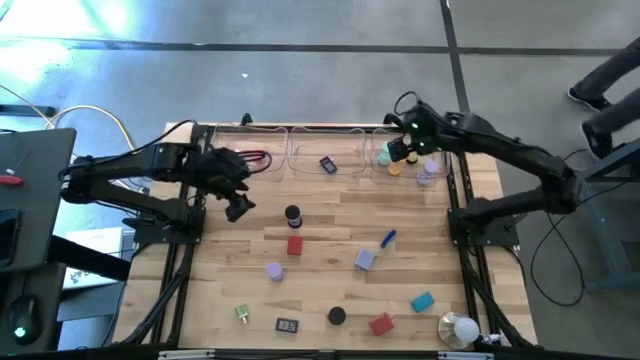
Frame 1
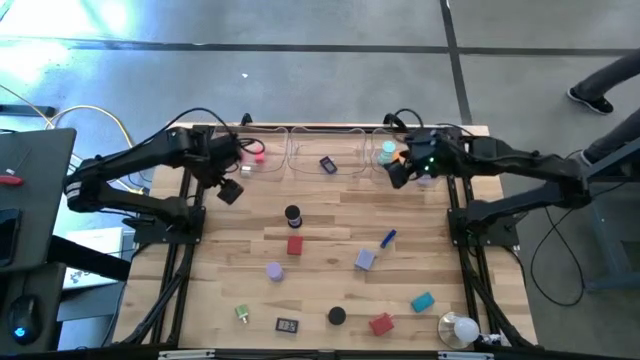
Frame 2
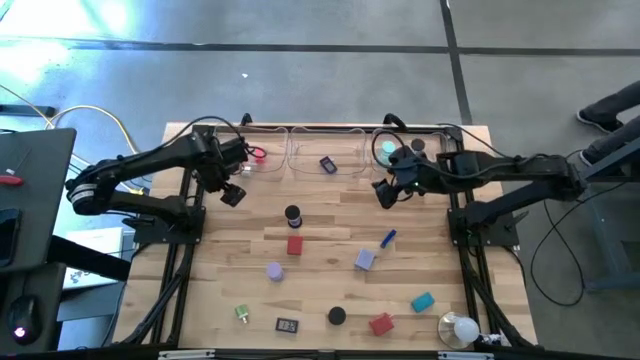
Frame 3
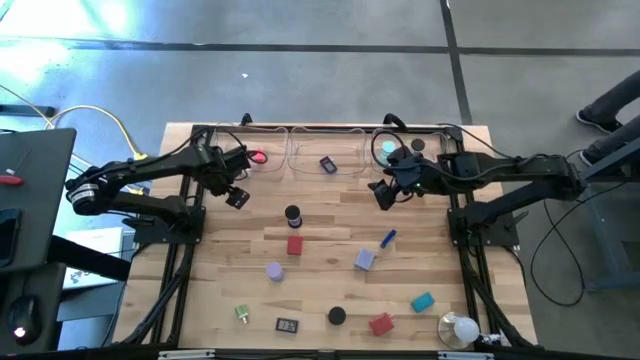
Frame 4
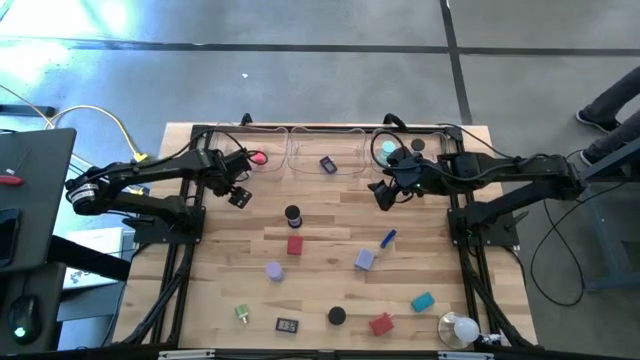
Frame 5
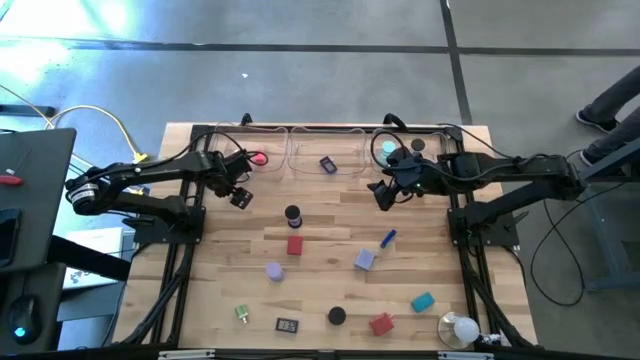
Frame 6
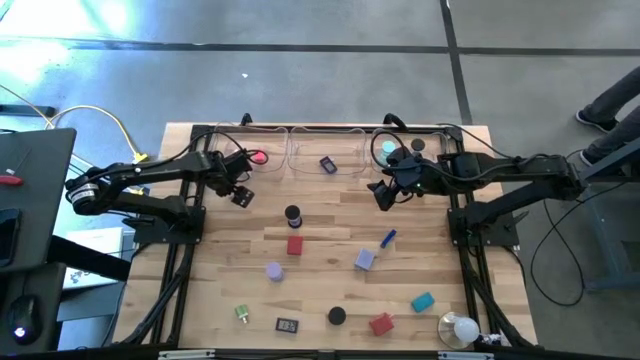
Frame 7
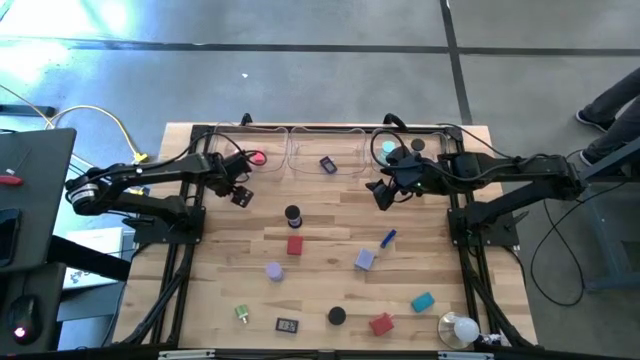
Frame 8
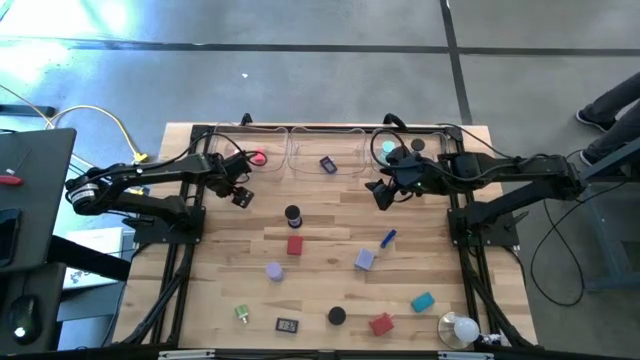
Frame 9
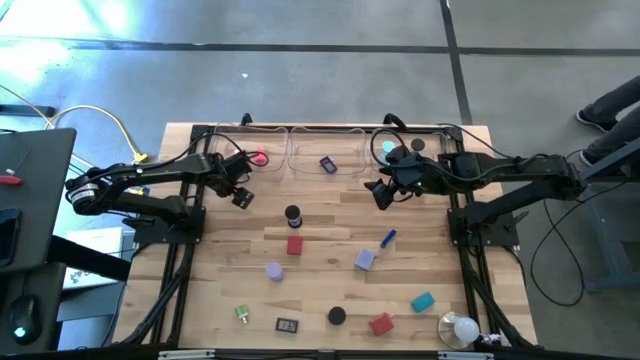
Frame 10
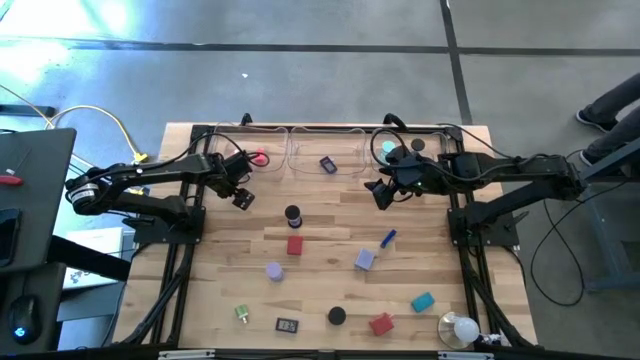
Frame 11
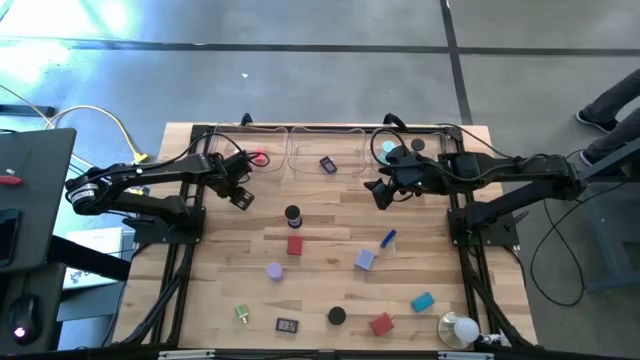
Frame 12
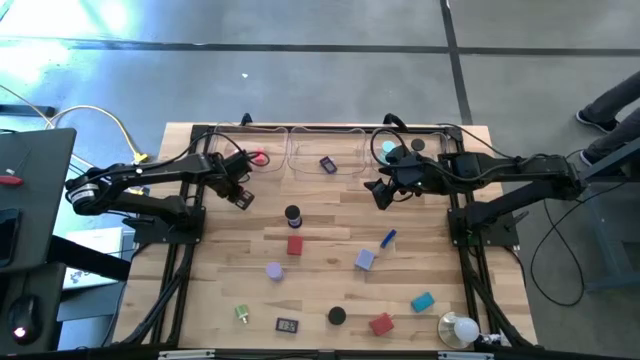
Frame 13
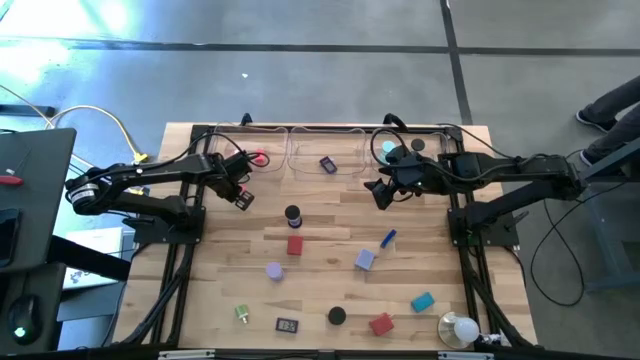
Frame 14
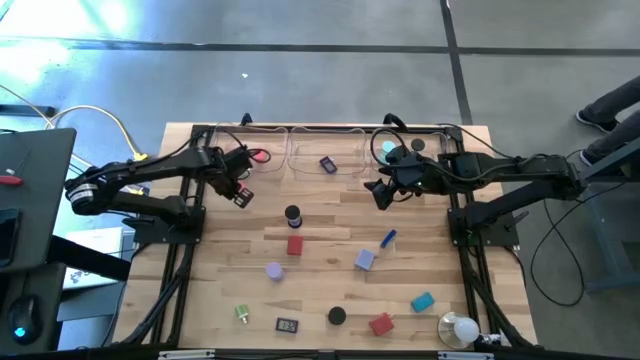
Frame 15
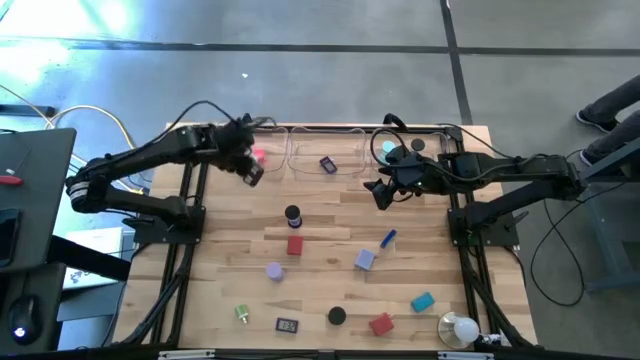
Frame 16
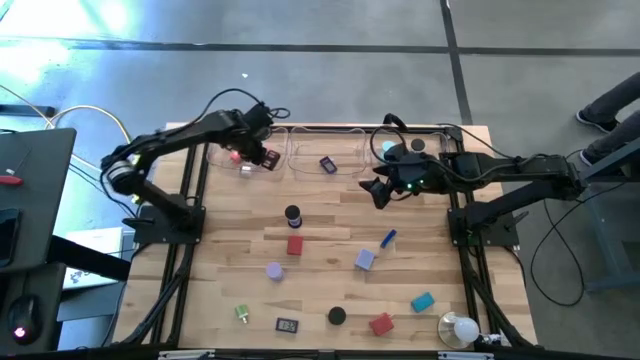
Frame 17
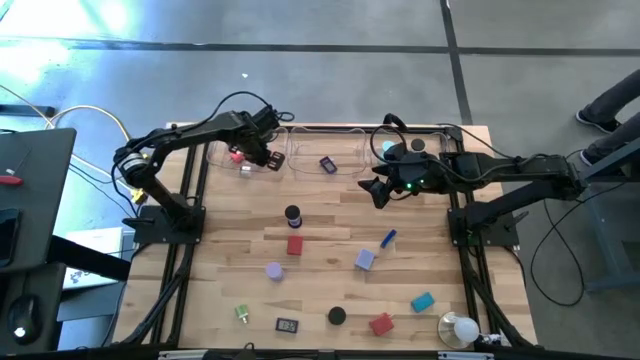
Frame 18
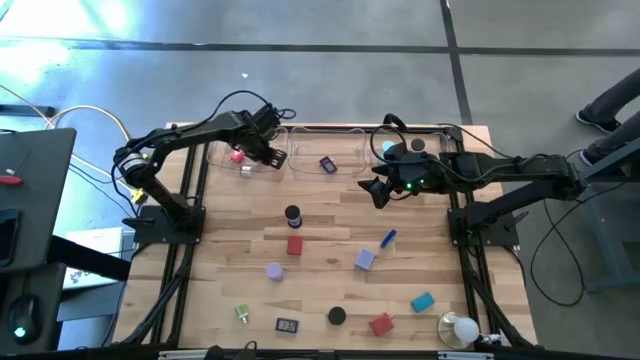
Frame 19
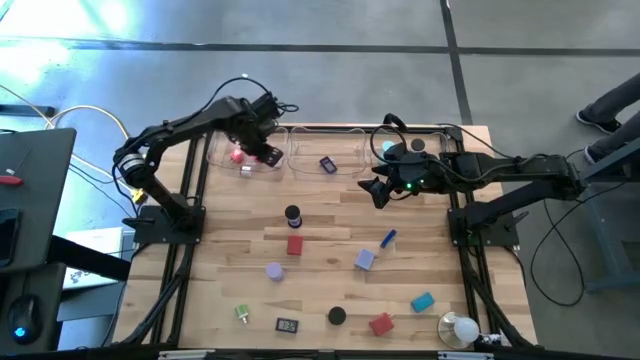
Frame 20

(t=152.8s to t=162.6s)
Task: Pick & Place Office items
Put the pink charger adapter into the left transparent bin

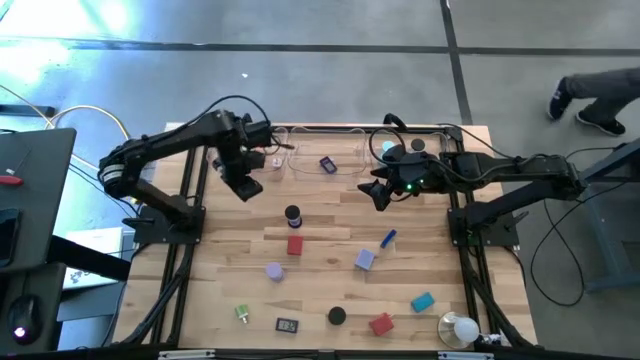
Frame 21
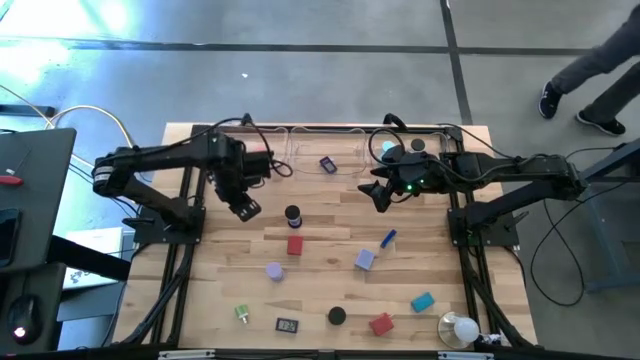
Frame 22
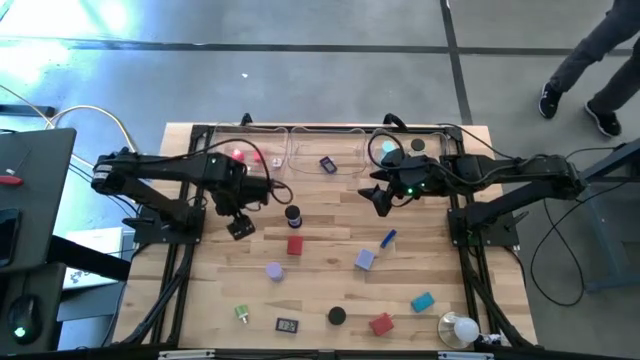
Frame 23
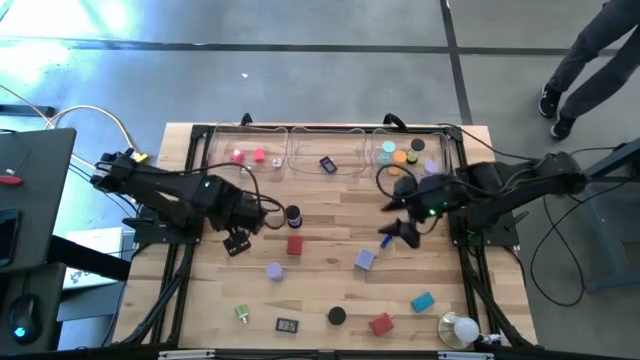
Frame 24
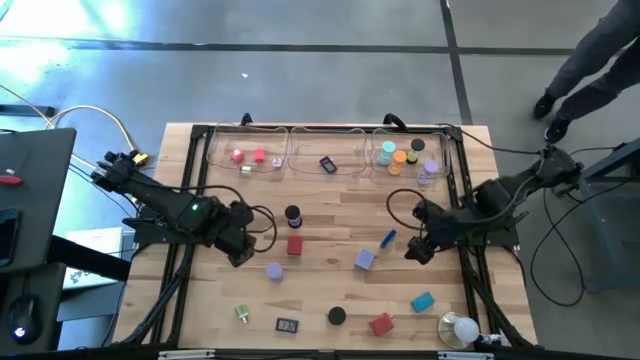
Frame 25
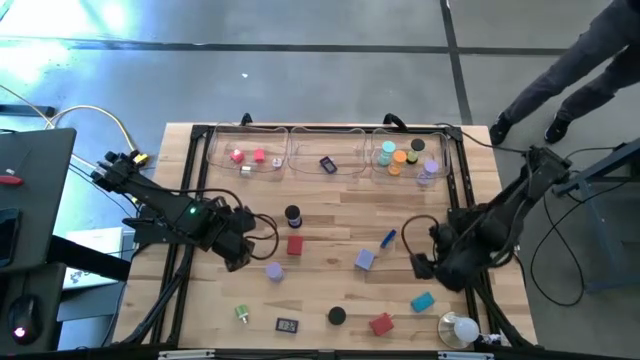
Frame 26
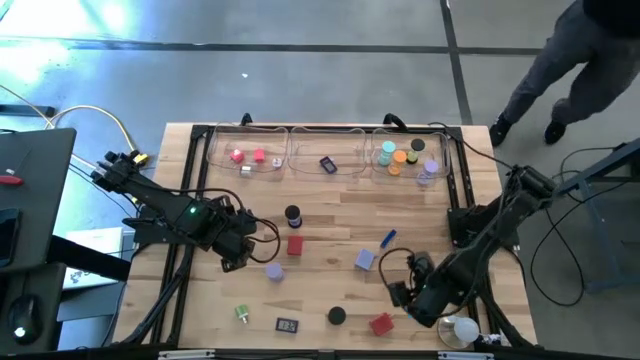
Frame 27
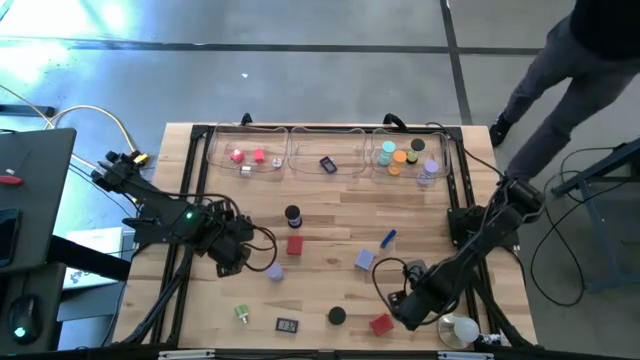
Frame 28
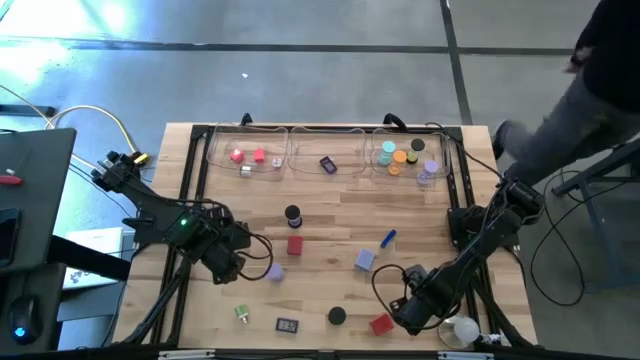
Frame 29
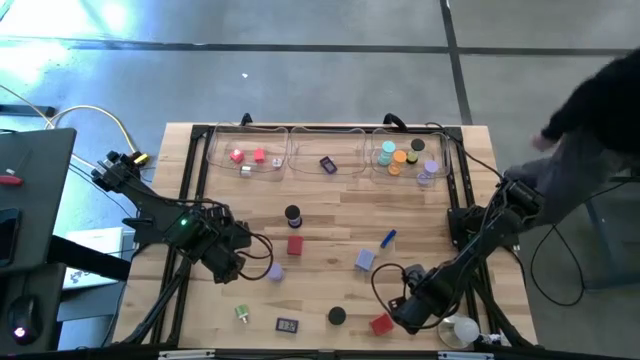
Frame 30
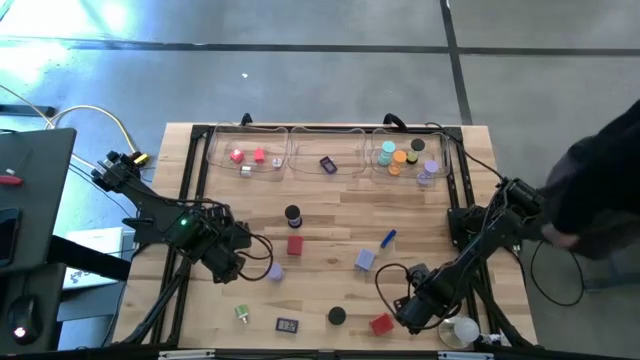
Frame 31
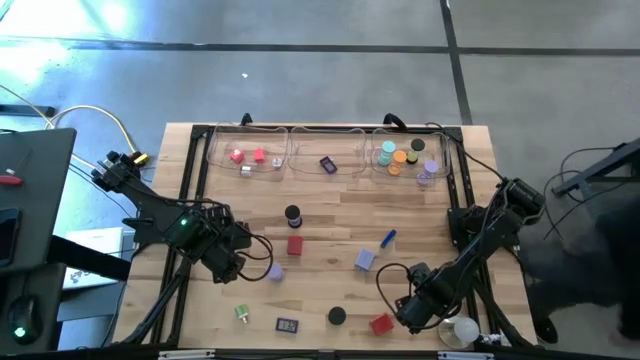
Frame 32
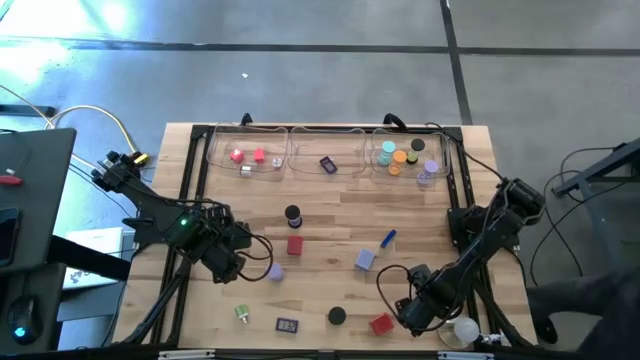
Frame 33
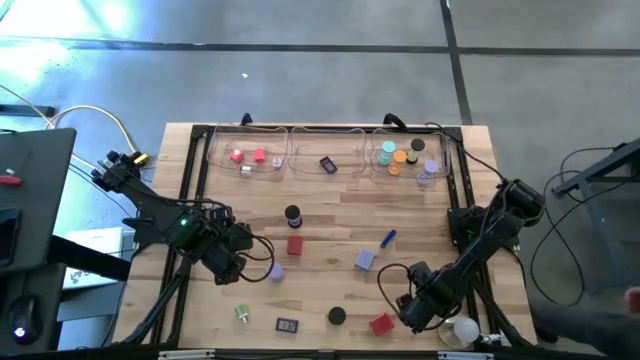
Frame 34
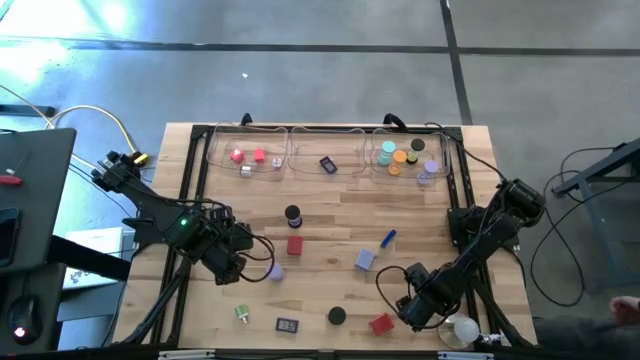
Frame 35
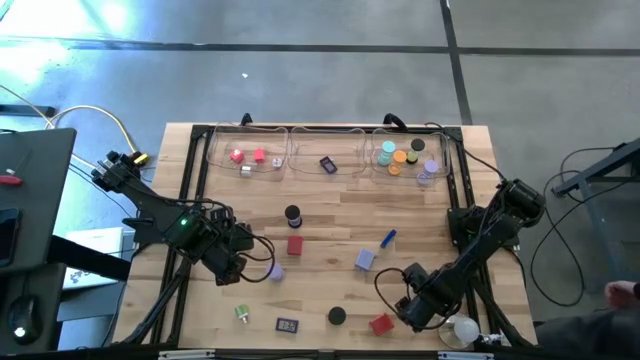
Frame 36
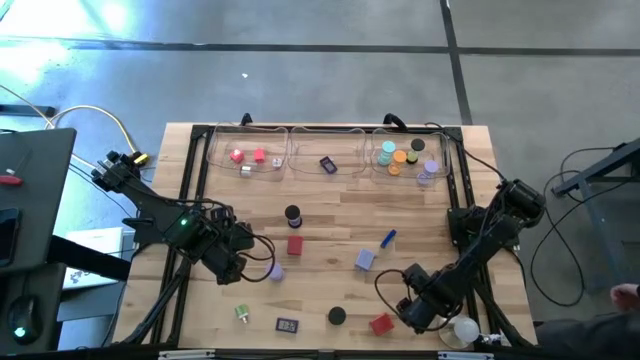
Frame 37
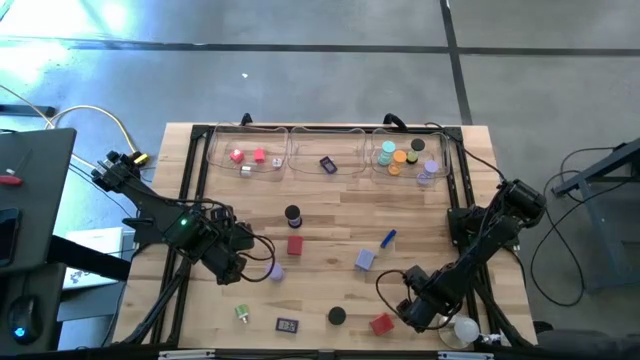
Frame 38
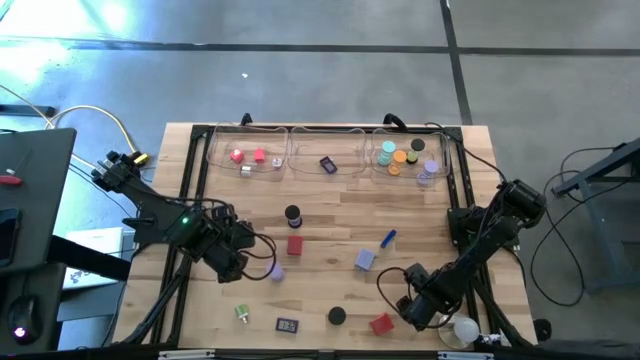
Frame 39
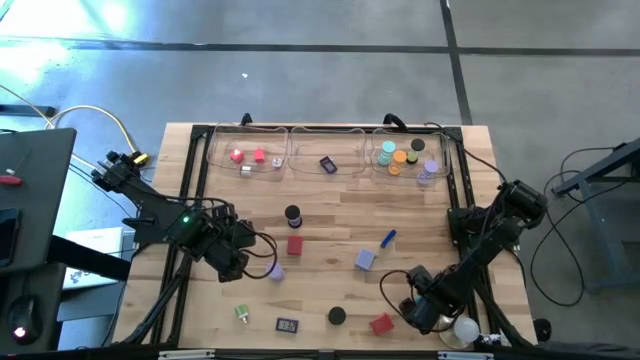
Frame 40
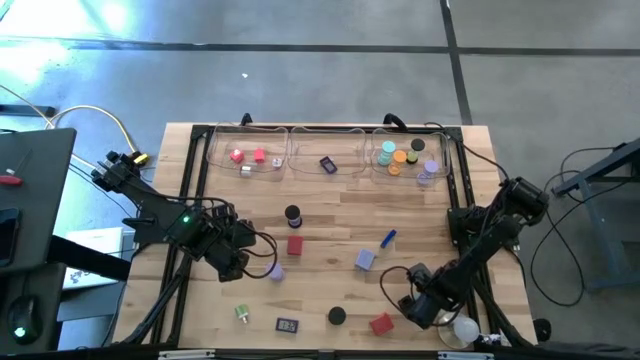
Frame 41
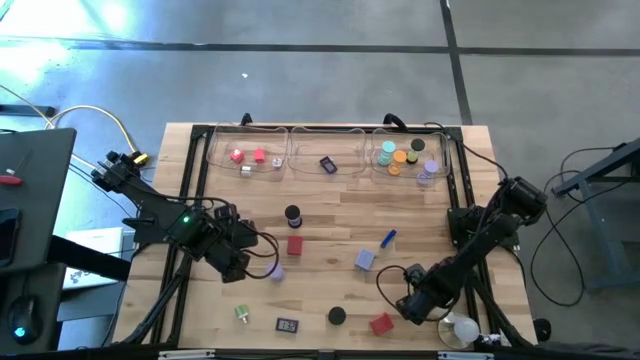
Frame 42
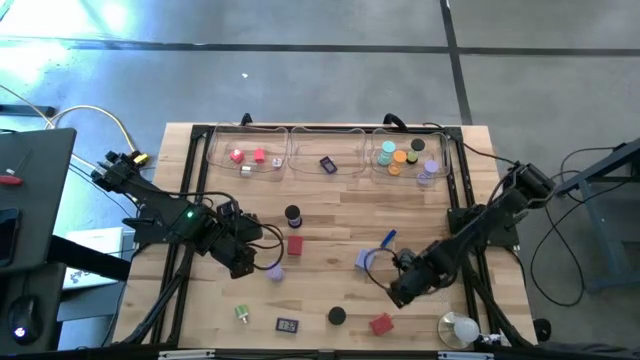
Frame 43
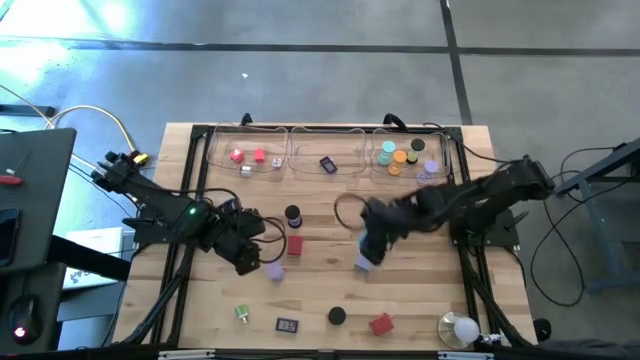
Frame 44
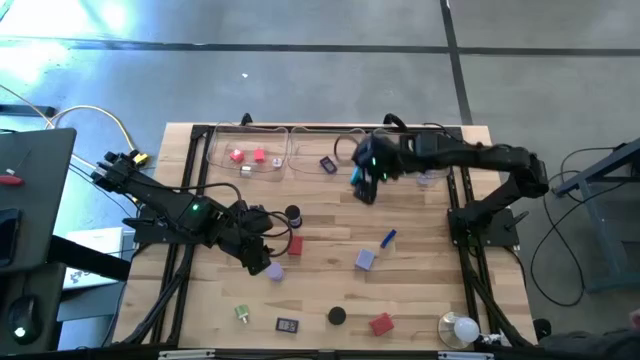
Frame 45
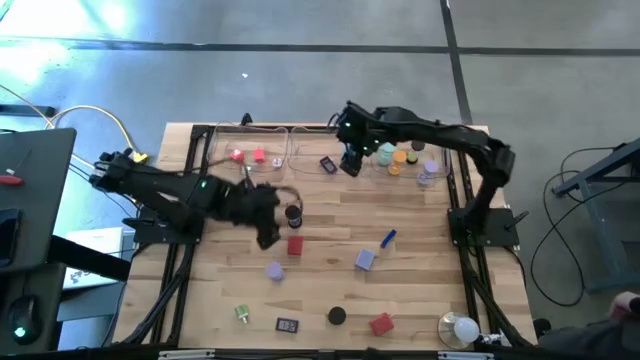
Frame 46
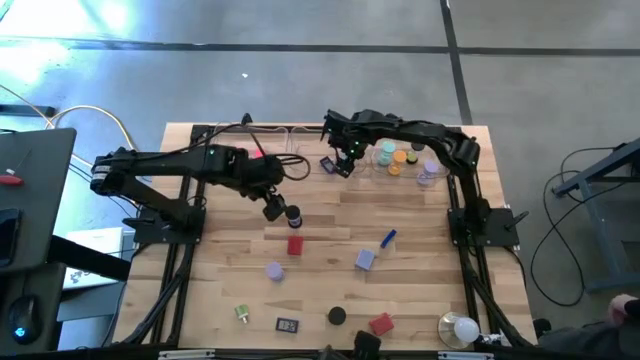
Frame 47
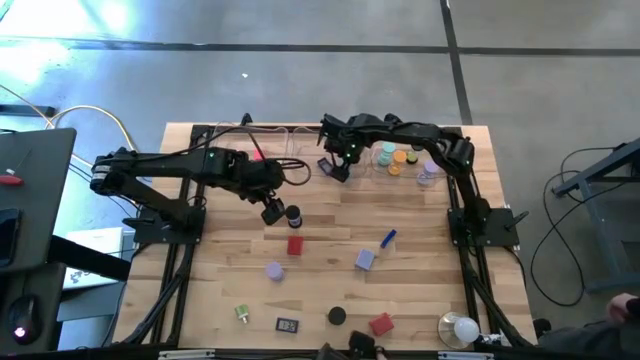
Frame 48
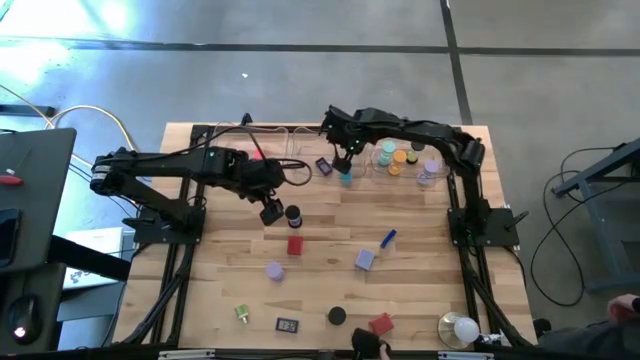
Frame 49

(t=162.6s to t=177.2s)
Put the light blue digital clock into the middle transparent bin
